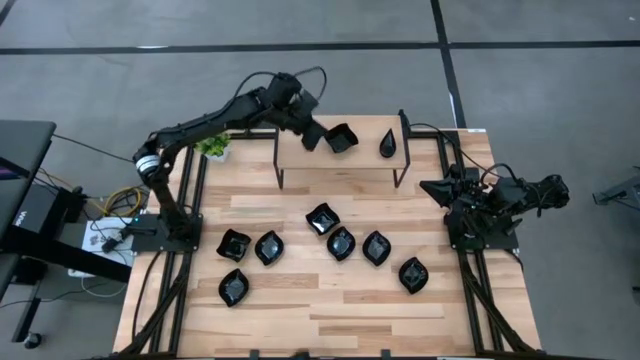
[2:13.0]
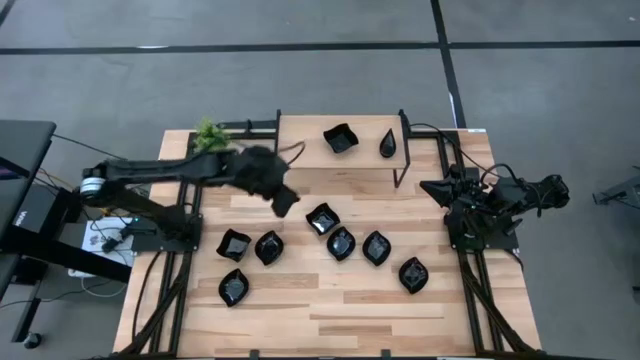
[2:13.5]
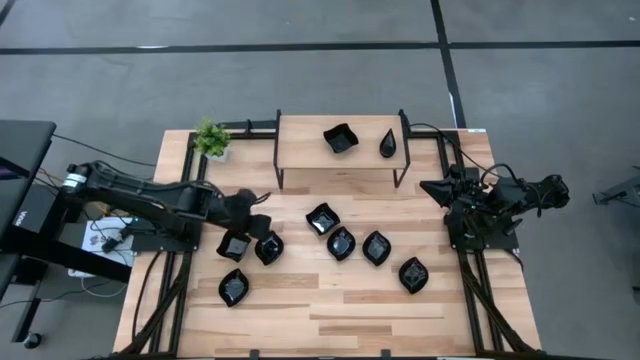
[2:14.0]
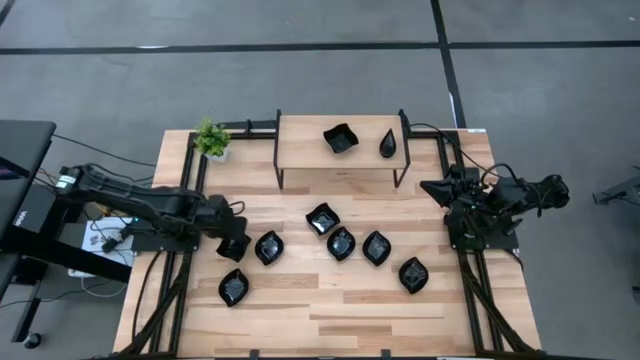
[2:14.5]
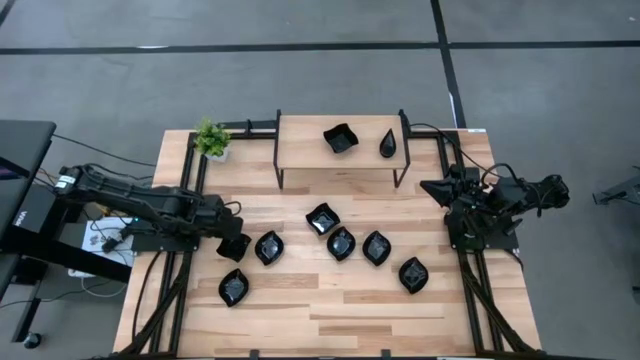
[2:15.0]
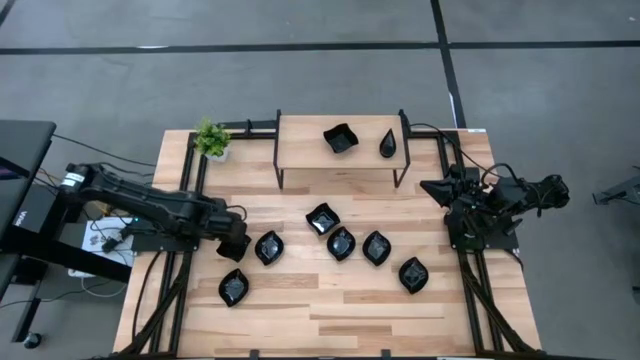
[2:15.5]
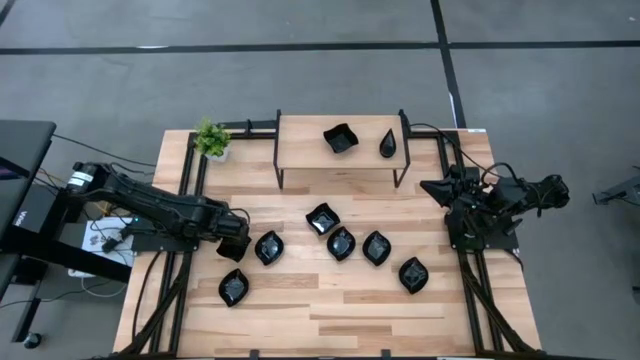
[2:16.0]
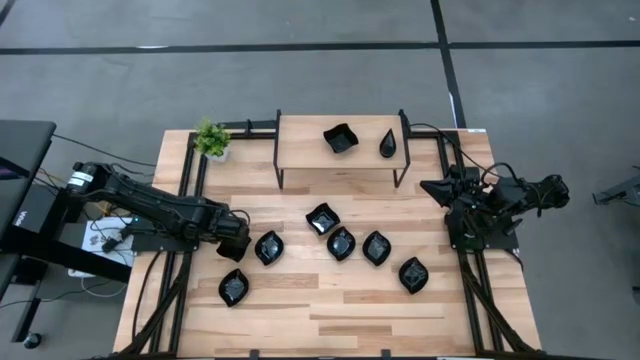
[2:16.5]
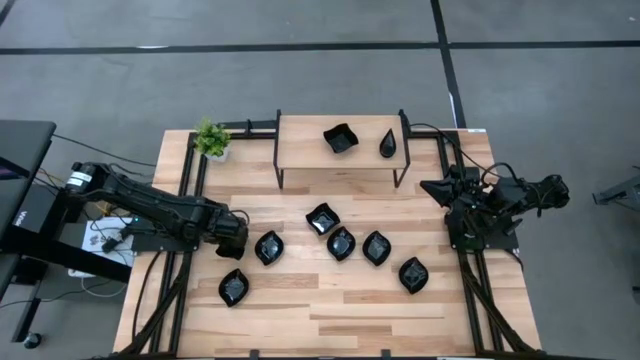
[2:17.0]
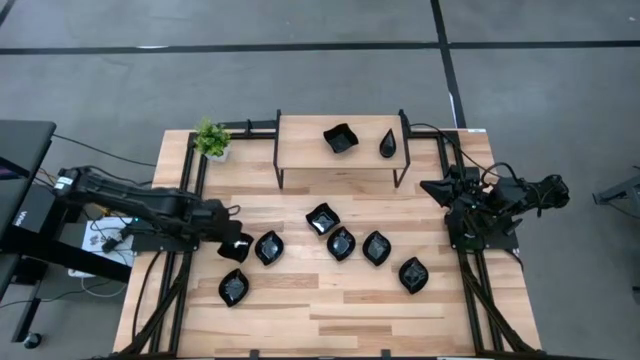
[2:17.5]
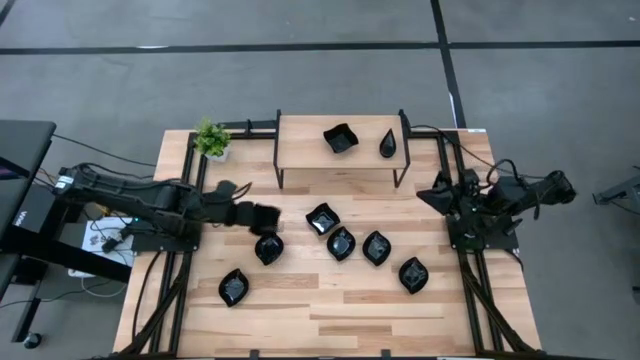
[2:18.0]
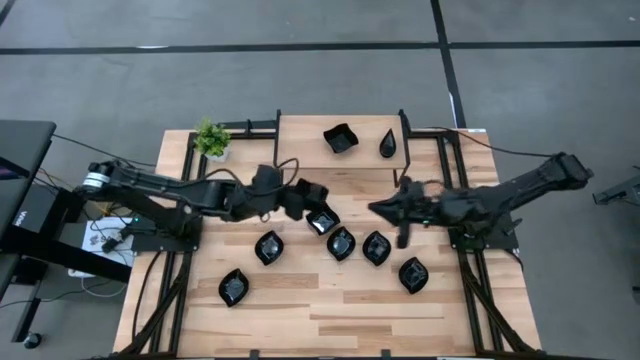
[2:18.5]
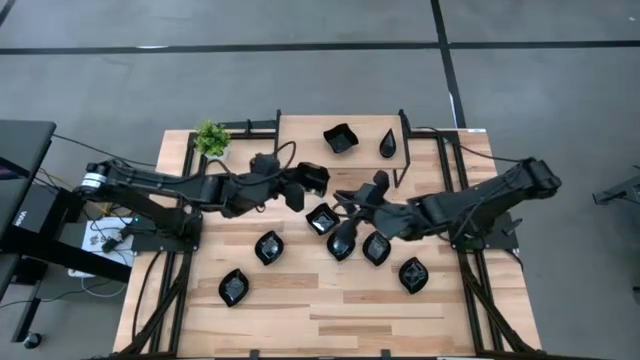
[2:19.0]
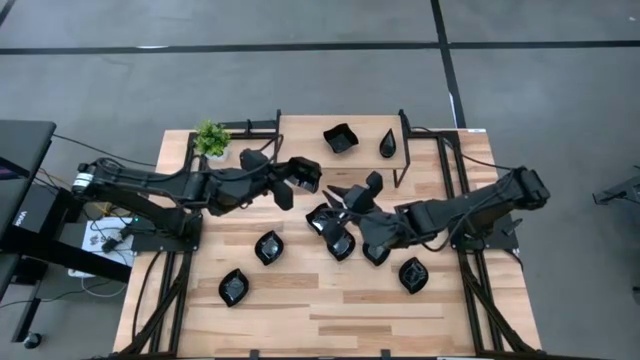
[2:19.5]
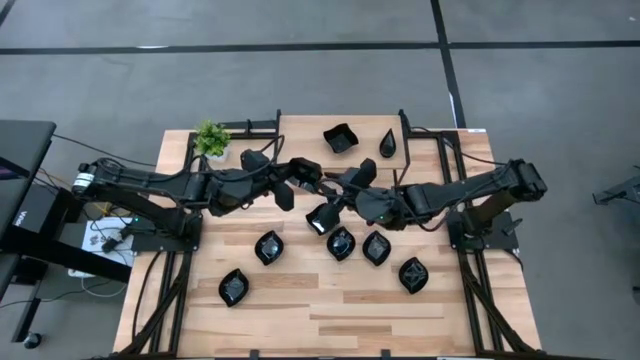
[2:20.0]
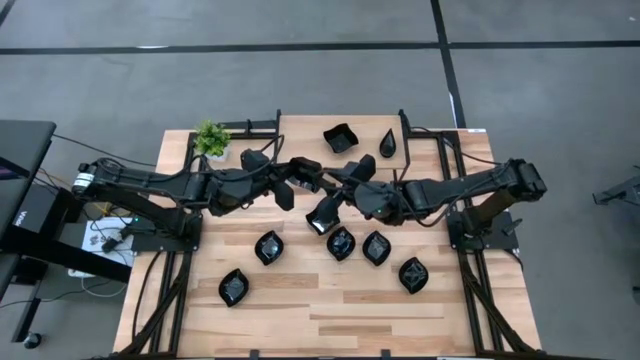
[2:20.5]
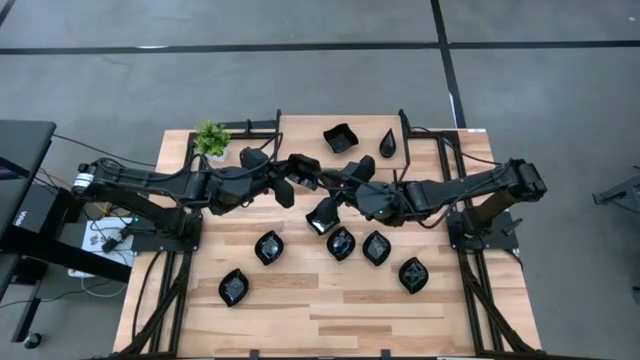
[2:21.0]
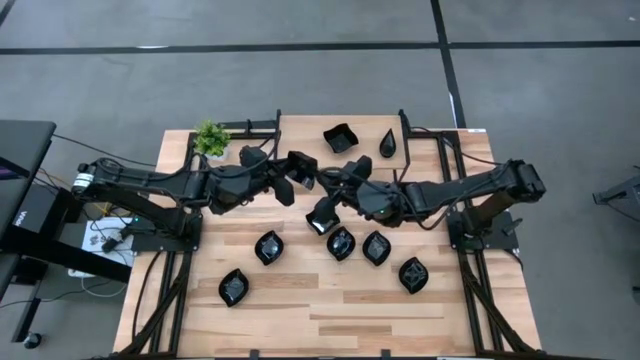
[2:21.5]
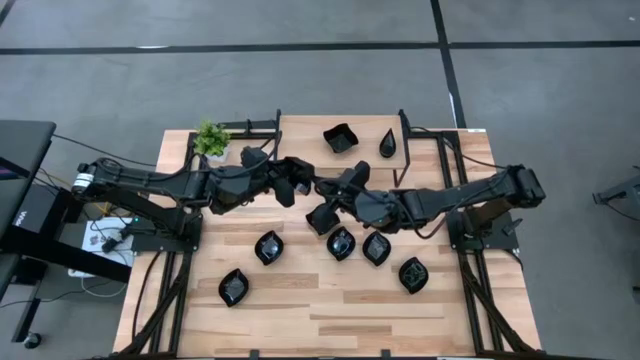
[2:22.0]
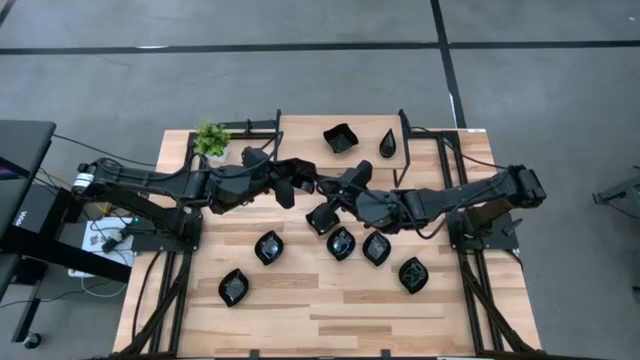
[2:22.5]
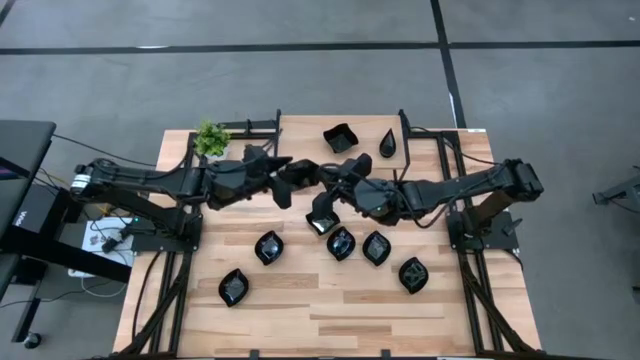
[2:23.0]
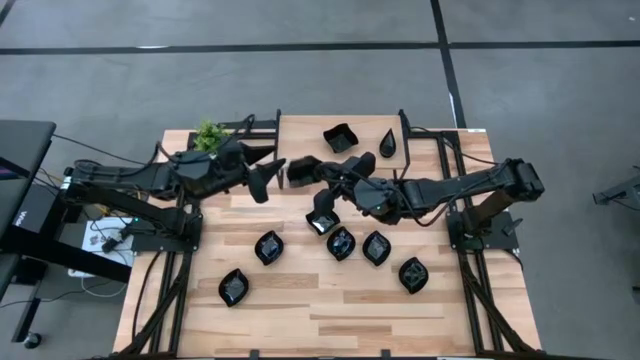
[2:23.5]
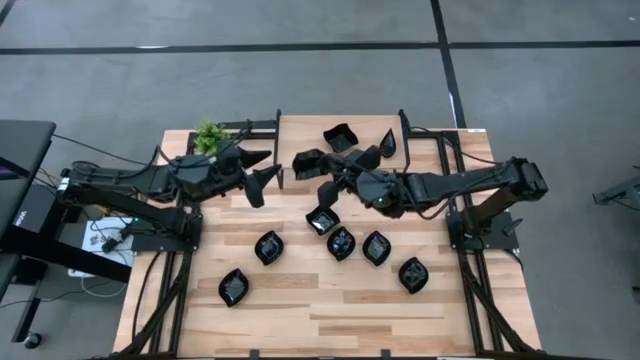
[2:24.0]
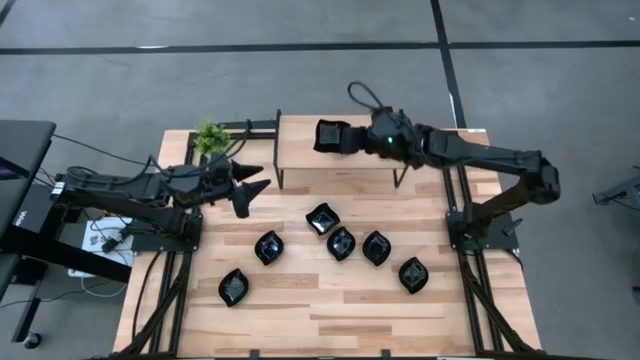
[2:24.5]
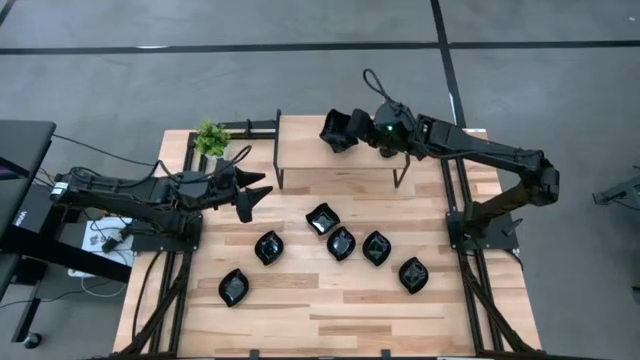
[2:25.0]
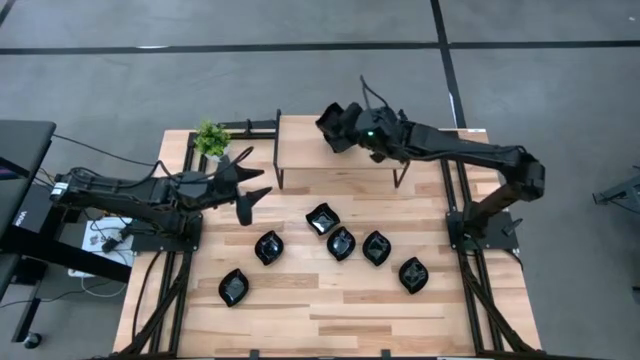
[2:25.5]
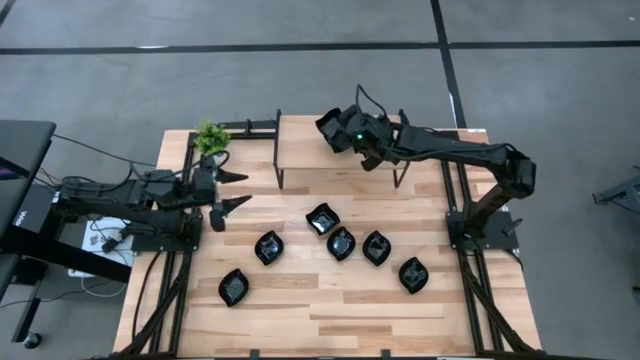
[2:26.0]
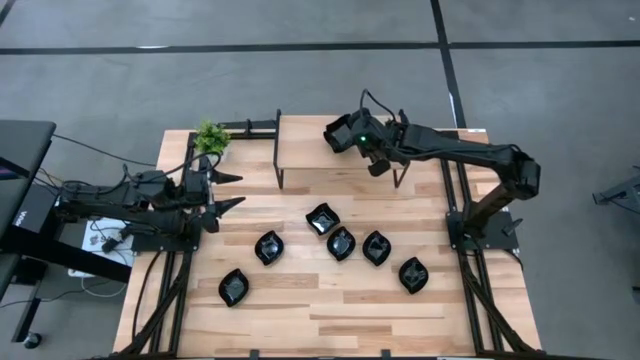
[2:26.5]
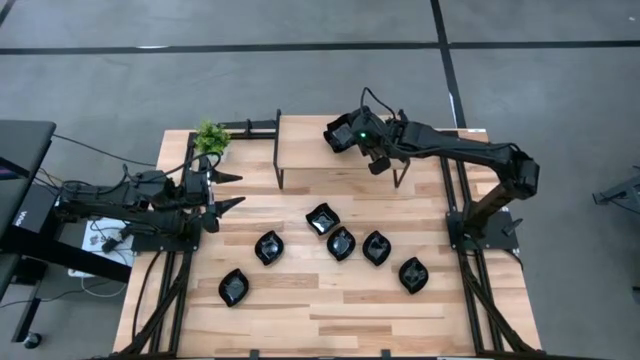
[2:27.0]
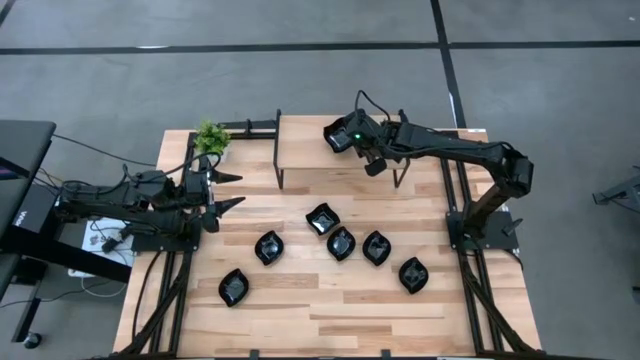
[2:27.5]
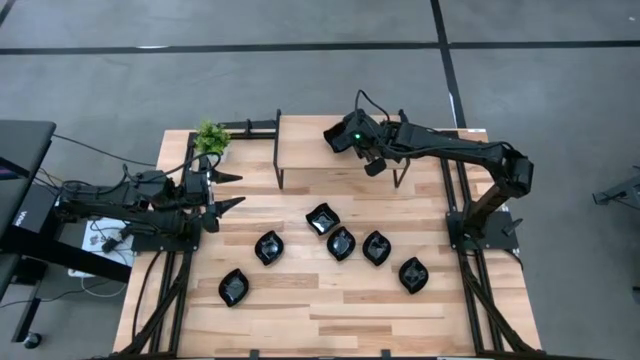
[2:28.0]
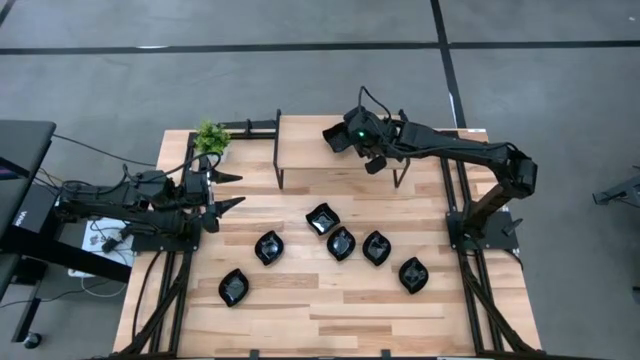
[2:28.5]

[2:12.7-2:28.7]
Task: Pick & Place Mini shaped plates
Stack the black plate on top of the black plate on the shelf

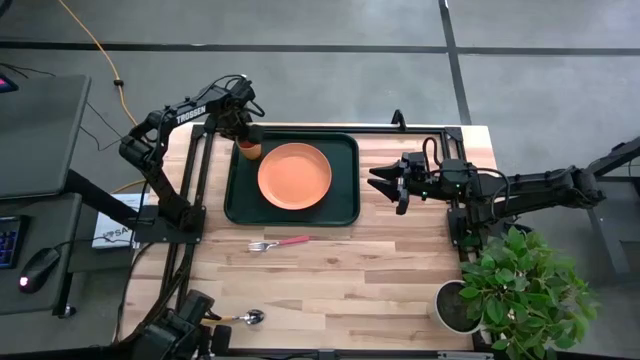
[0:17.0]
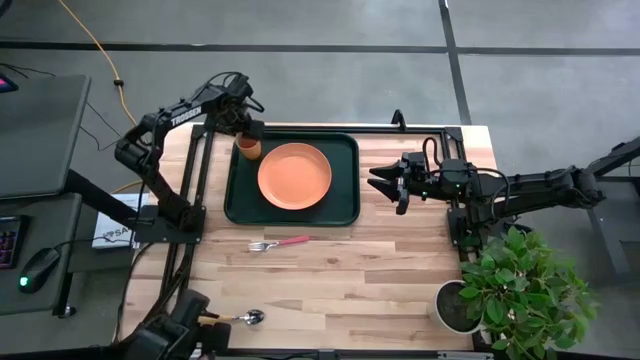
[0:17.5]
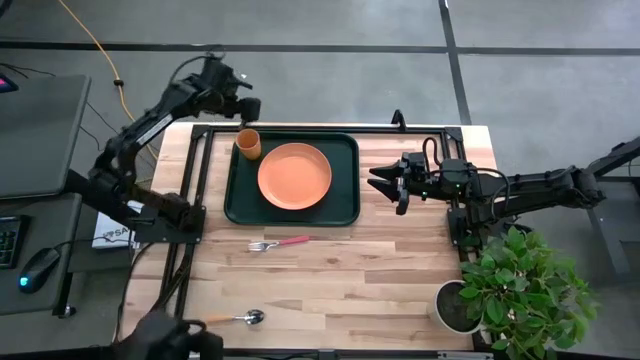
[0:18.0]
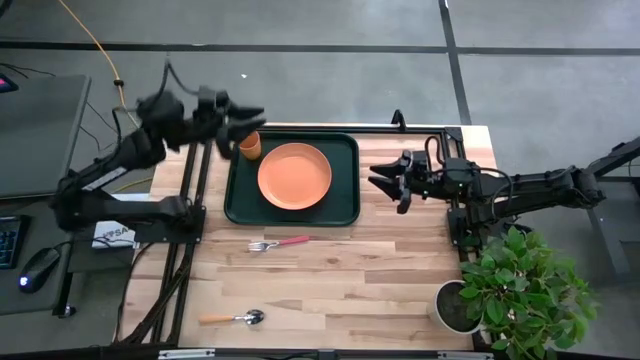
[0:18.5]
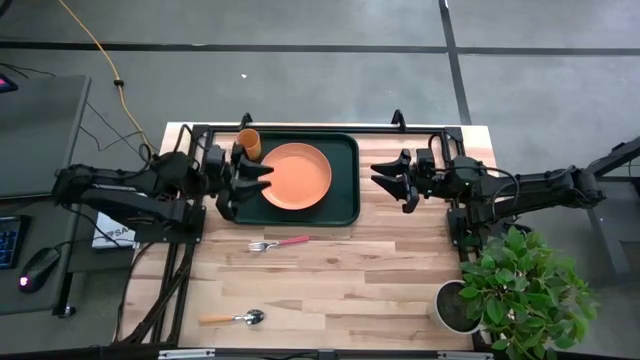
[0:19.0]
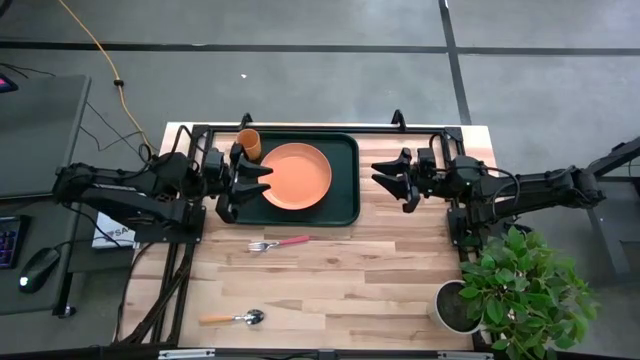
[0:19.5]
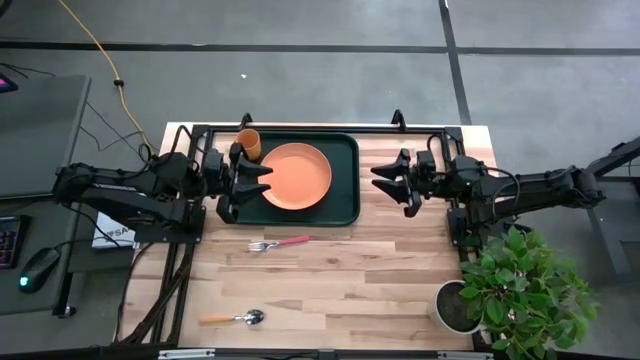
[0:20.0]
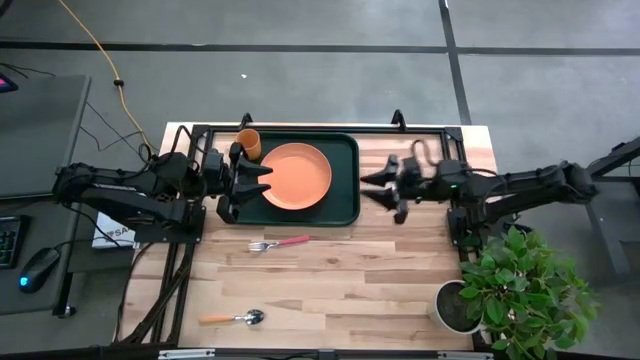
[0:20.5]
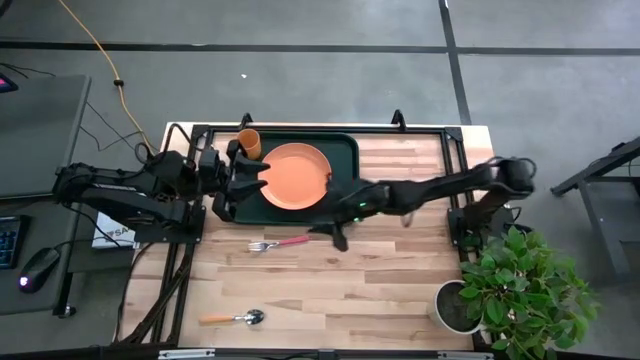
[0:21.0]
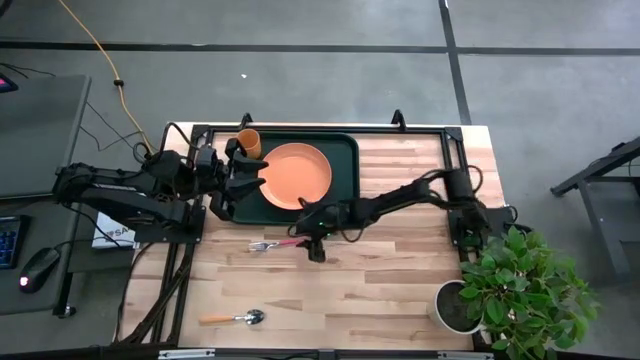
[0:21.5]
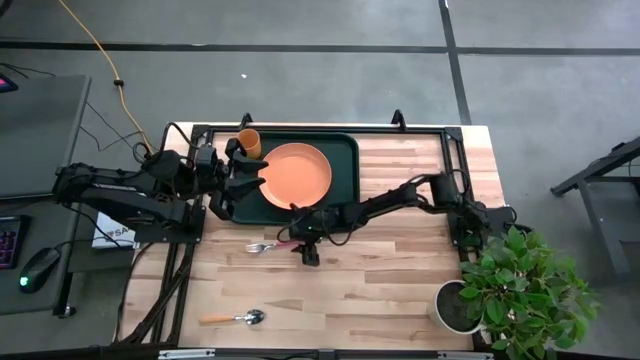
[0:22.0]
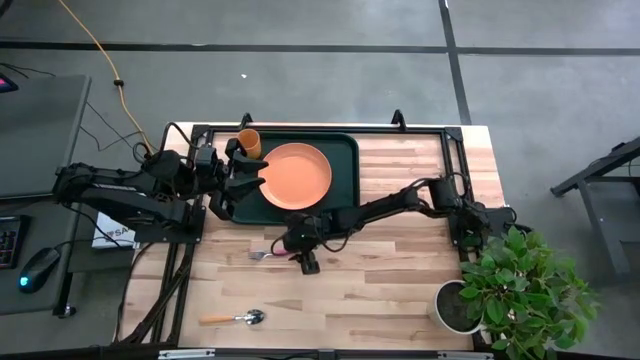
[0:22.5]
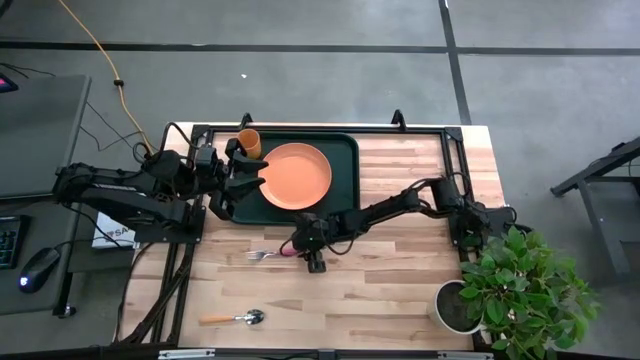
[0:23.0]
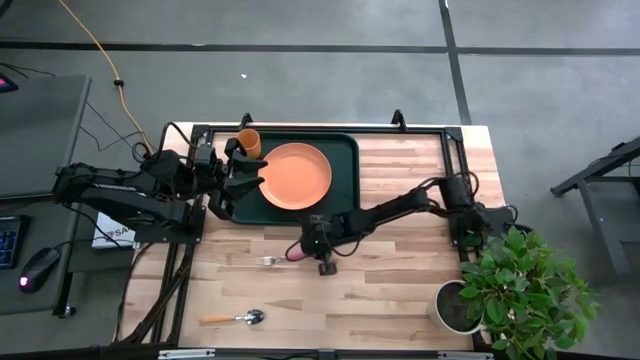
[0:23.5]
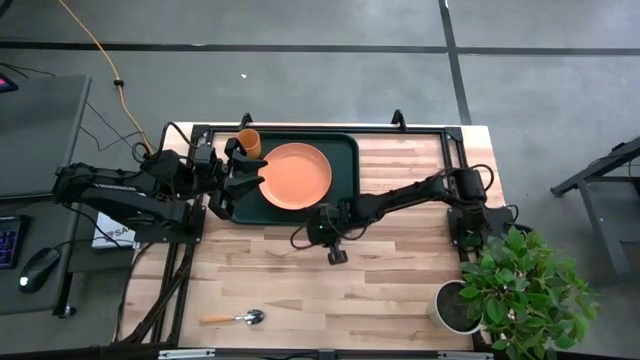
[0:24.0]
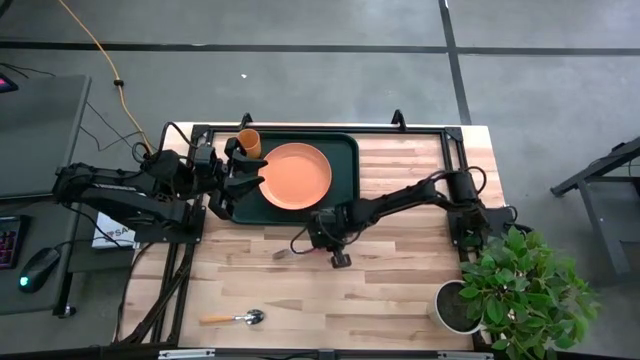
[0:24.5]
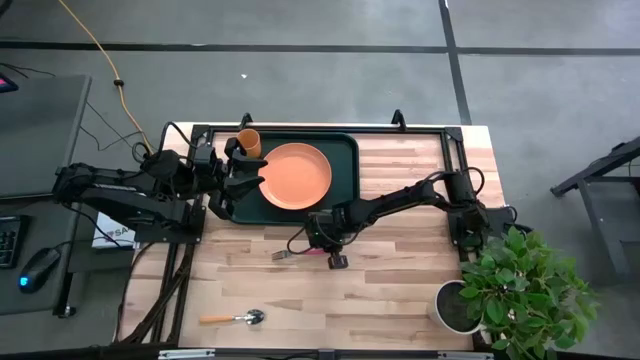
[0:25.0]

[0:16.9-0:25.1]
Task: Pick and place plate/cup/fork/spoon on tray
Put the pink fork on the black serving tray
